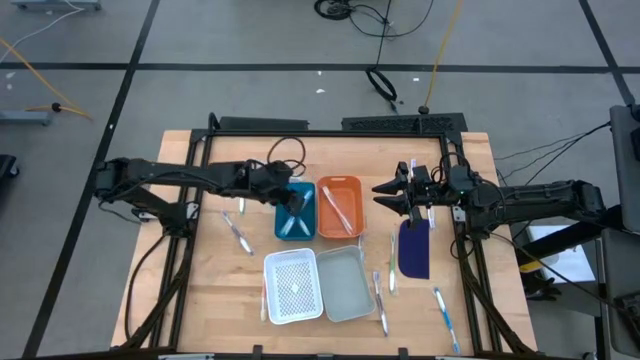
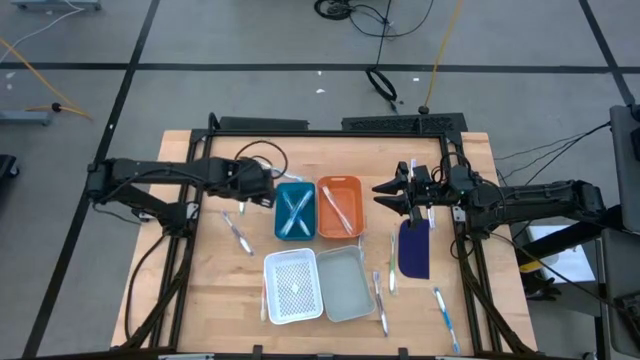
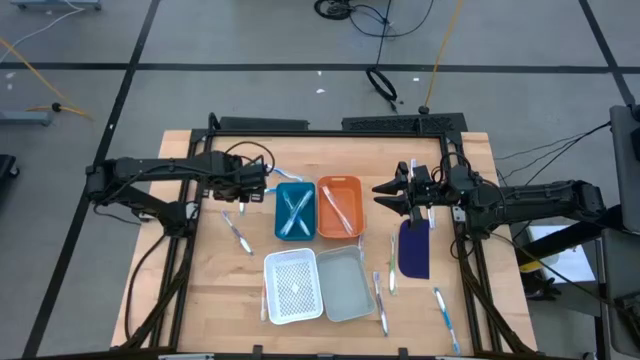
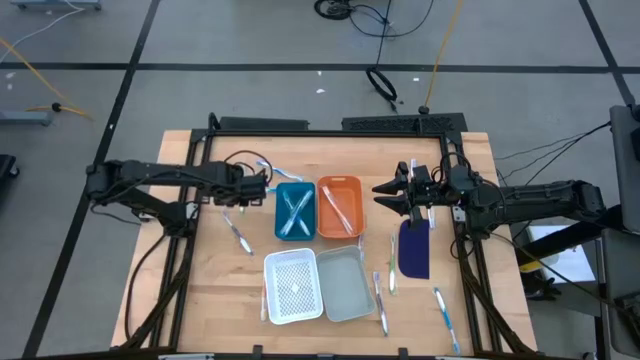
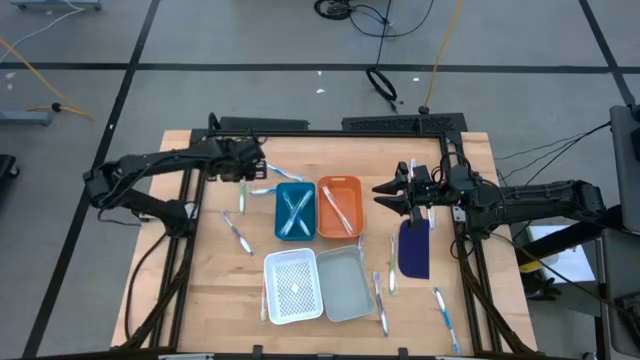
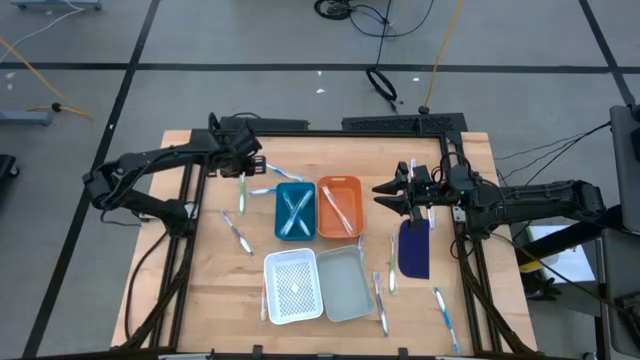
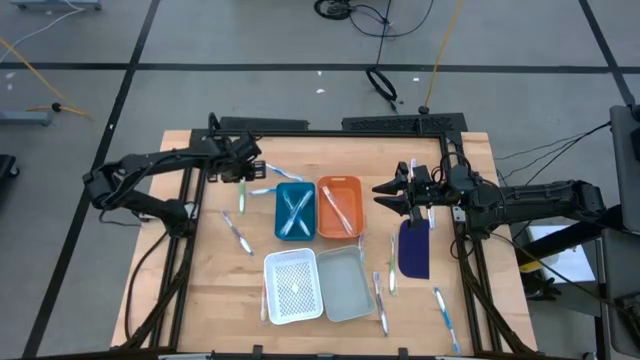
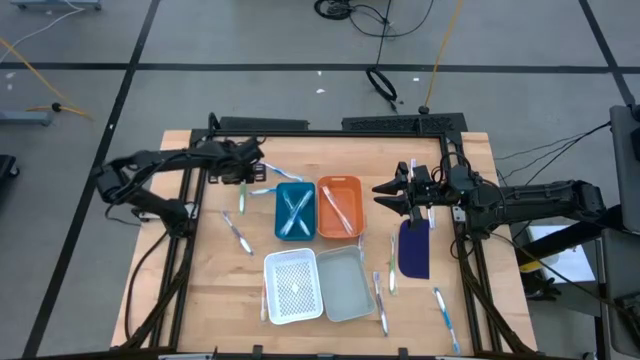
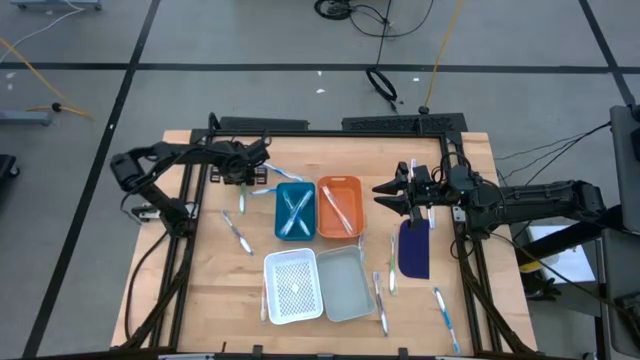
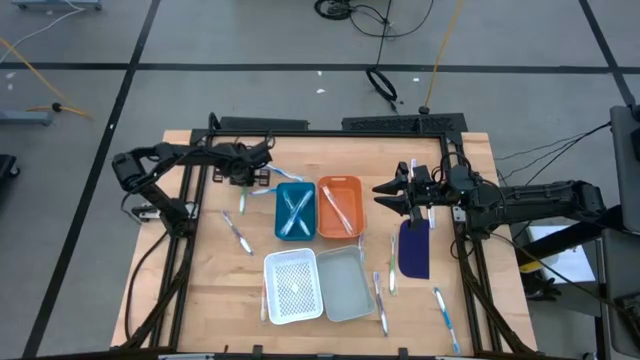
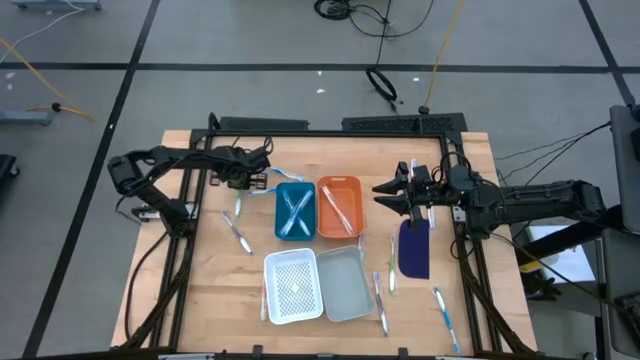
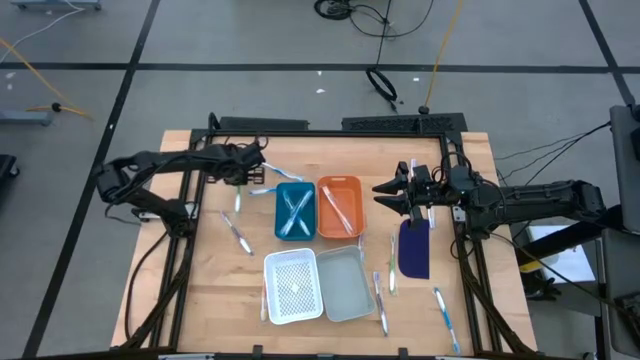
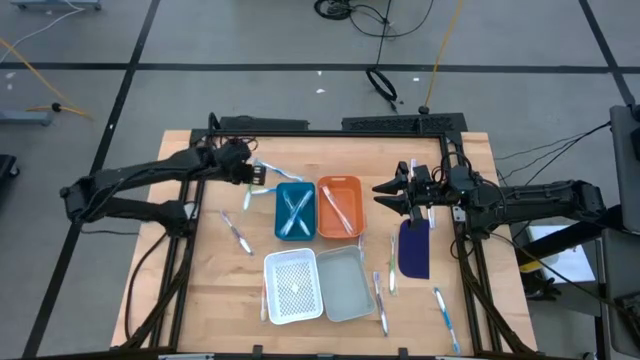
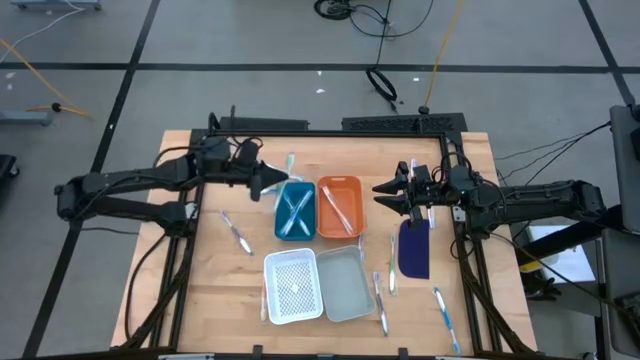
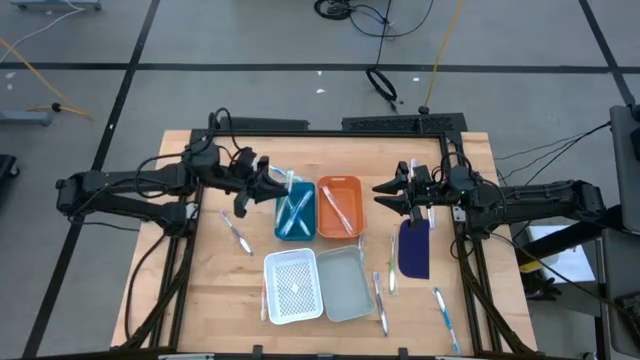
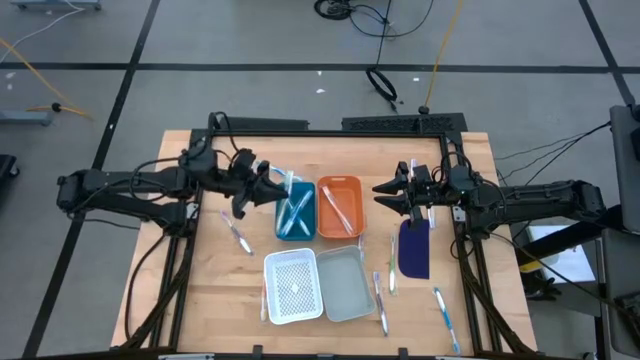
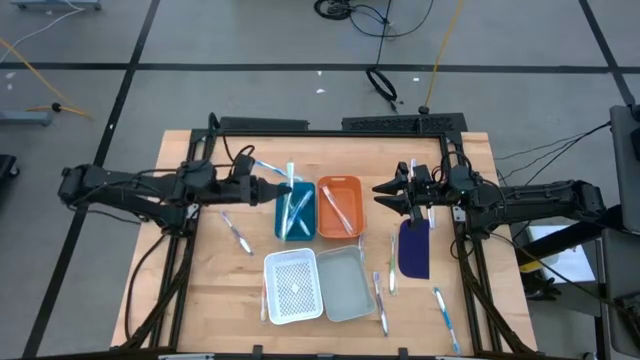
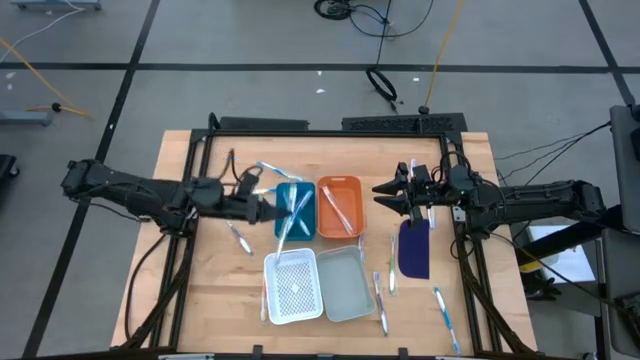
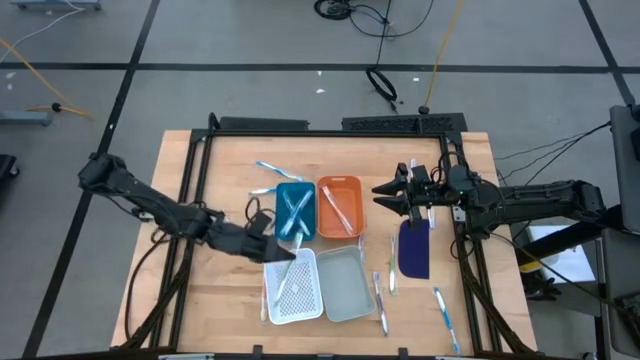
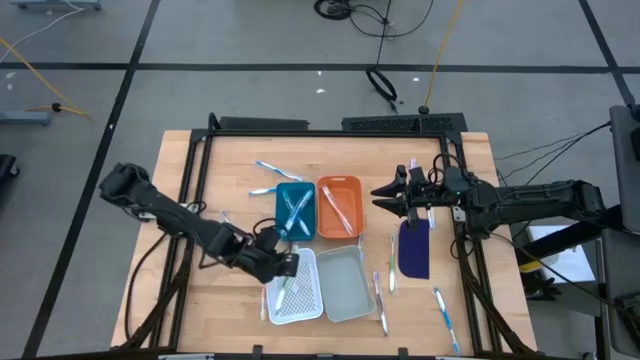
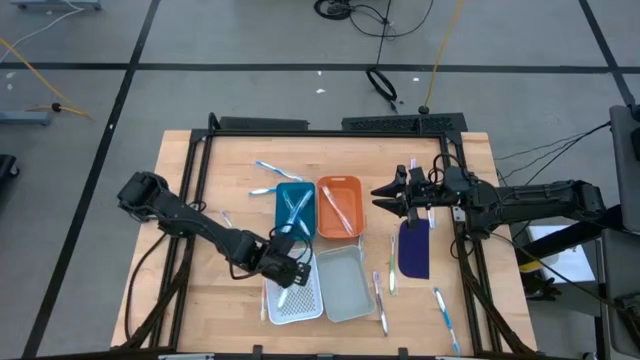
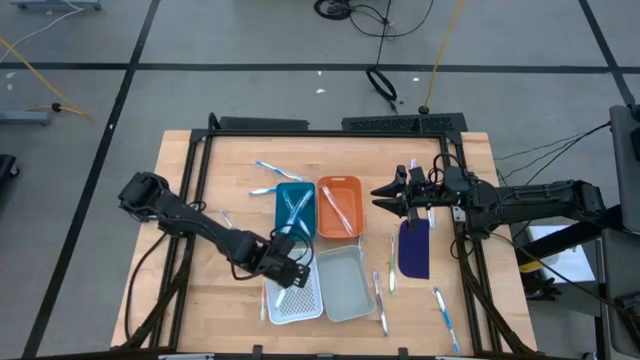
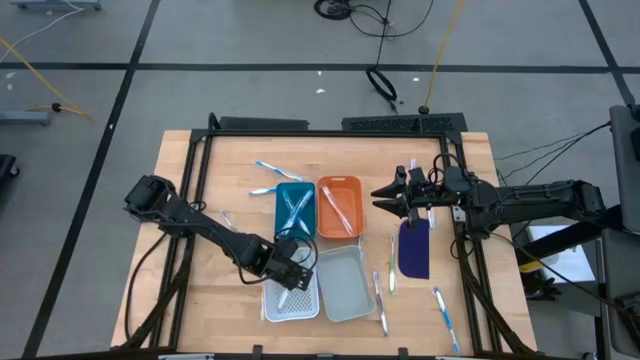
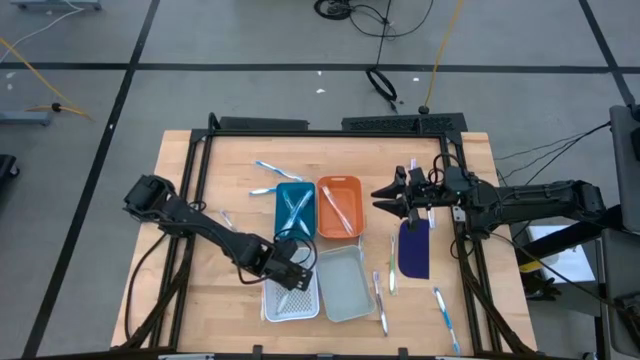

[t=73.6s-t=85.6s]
Task: Pick & Place Toothbrushes
Put the green toothbrush into the white bin

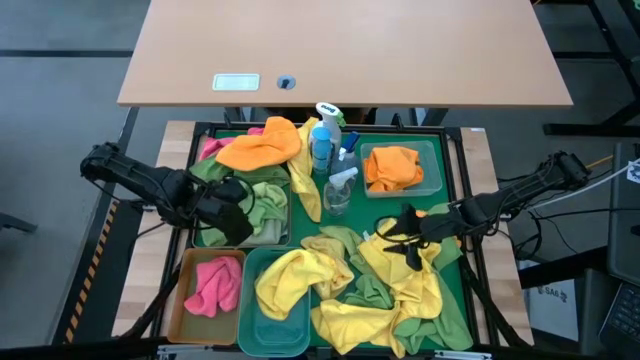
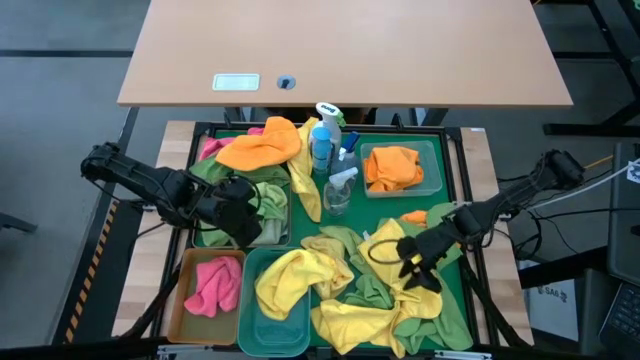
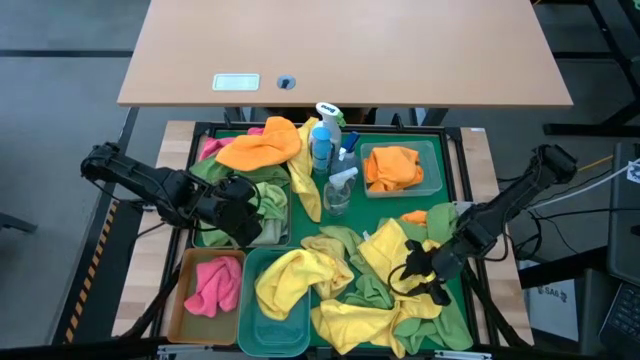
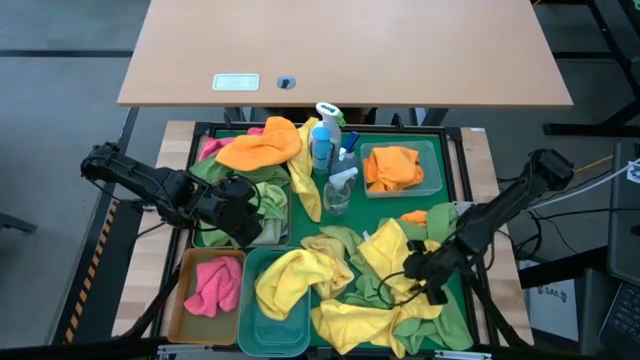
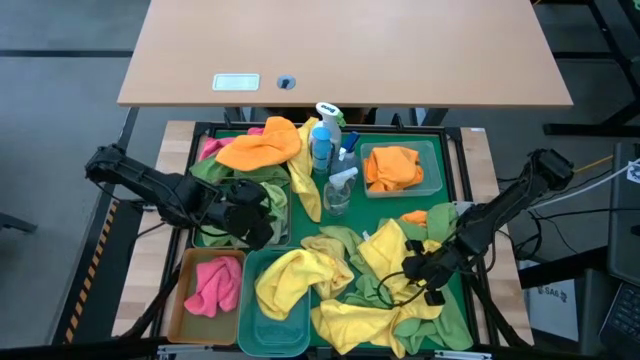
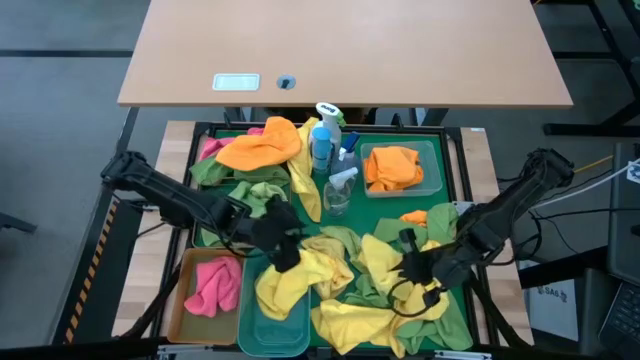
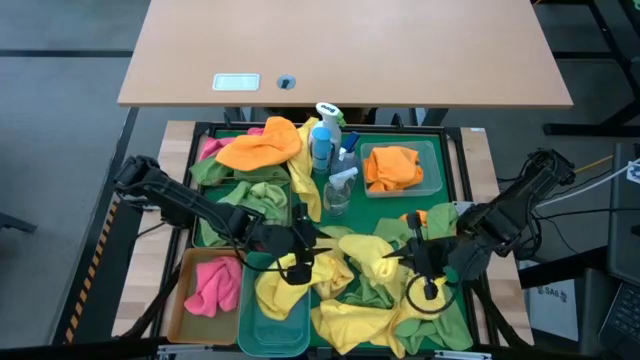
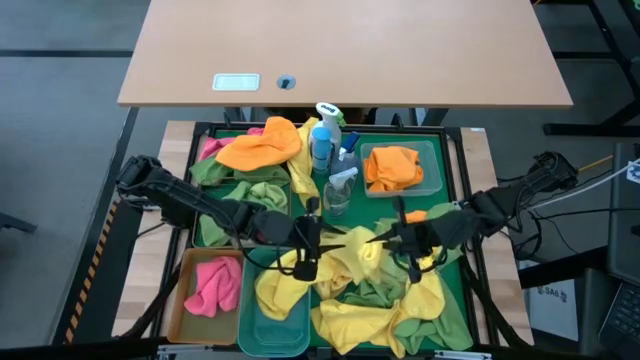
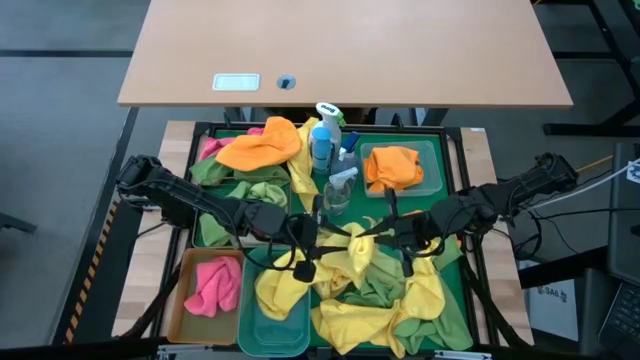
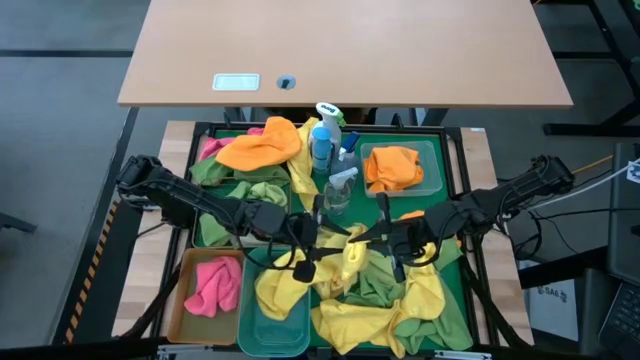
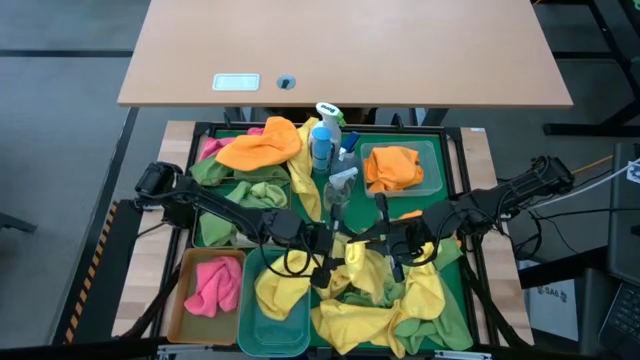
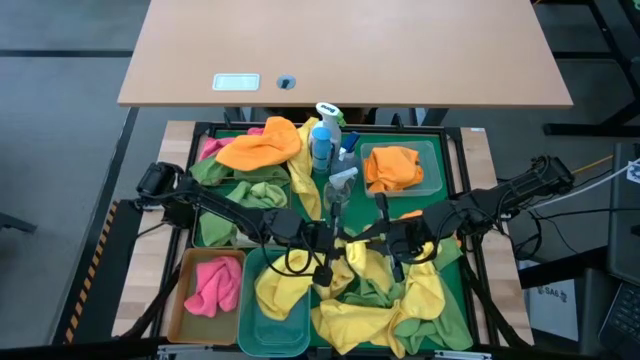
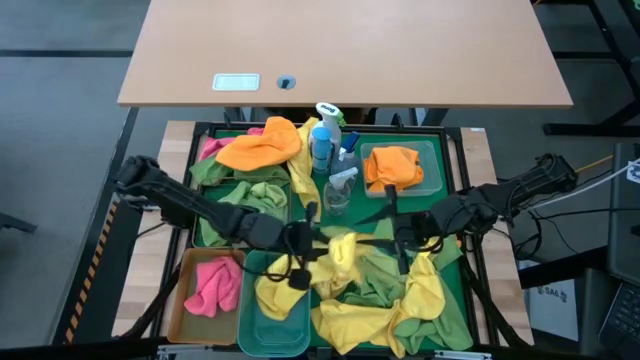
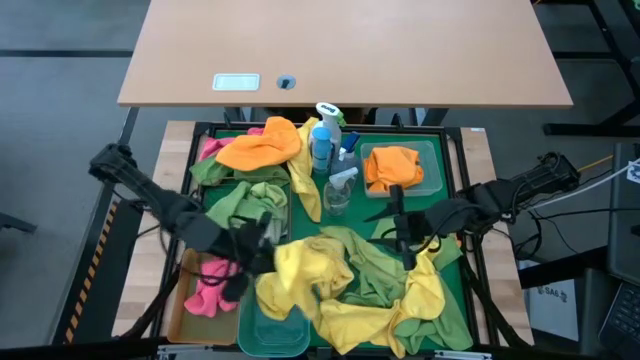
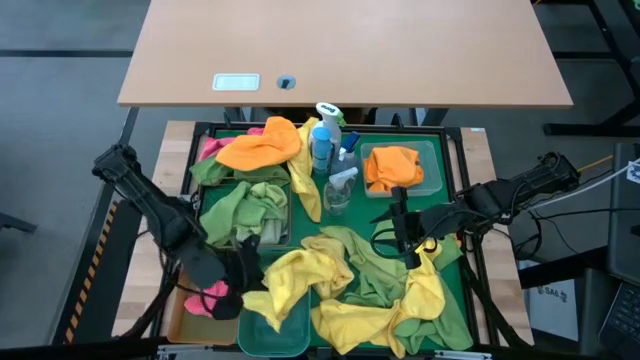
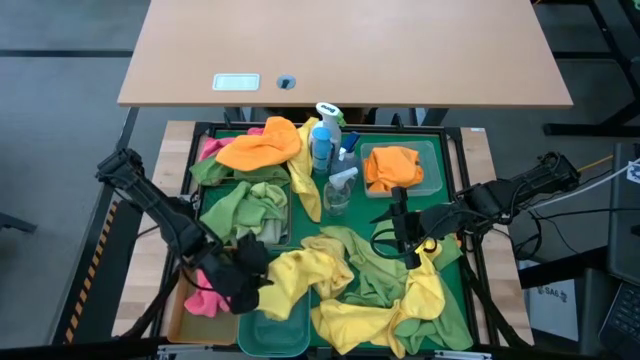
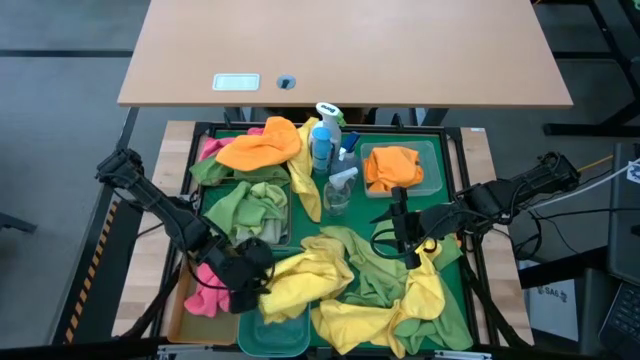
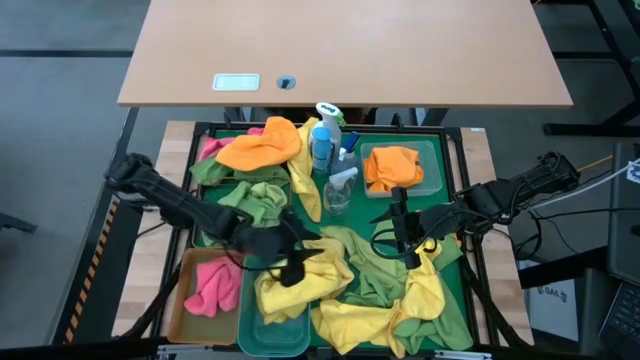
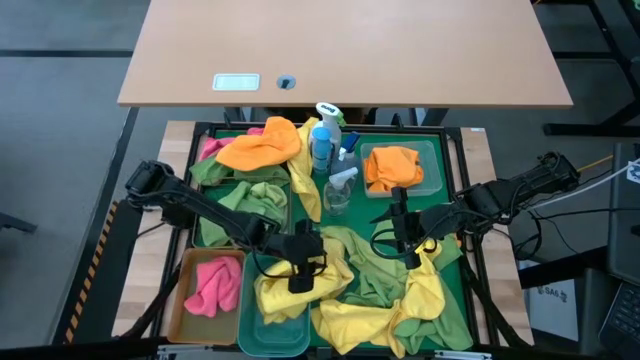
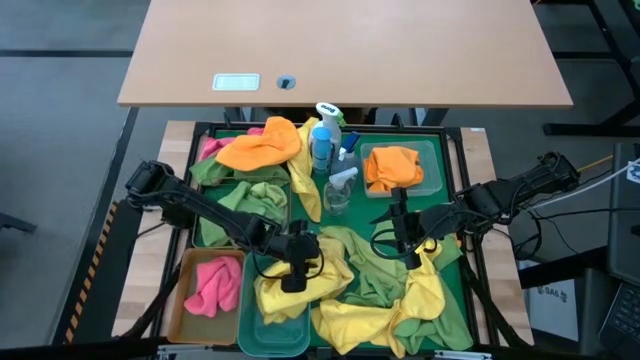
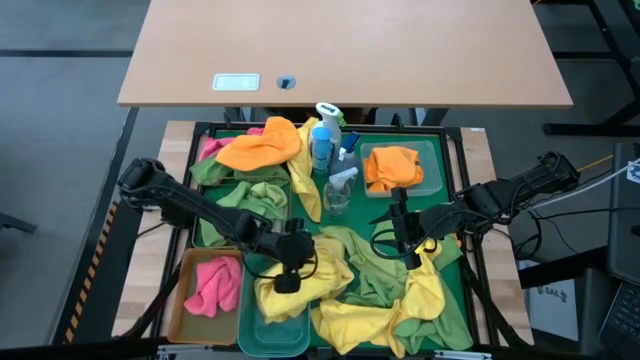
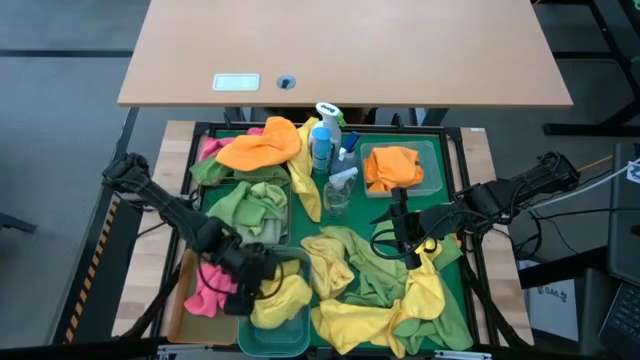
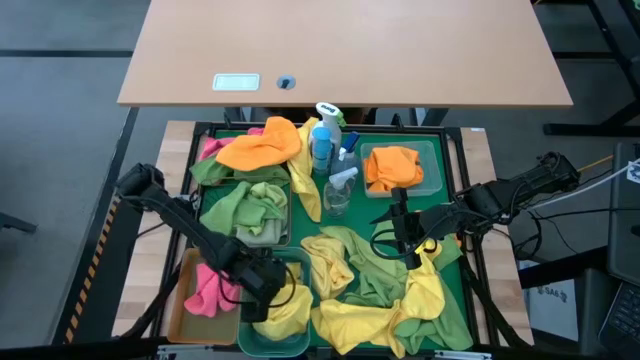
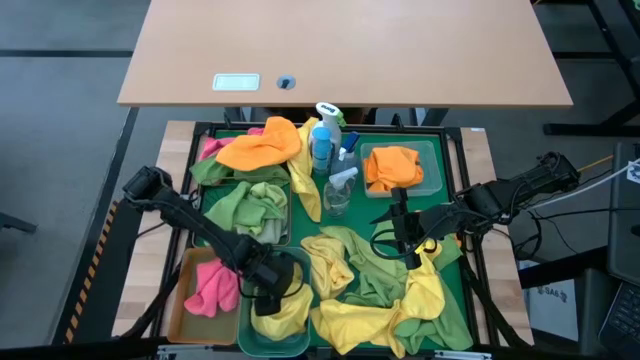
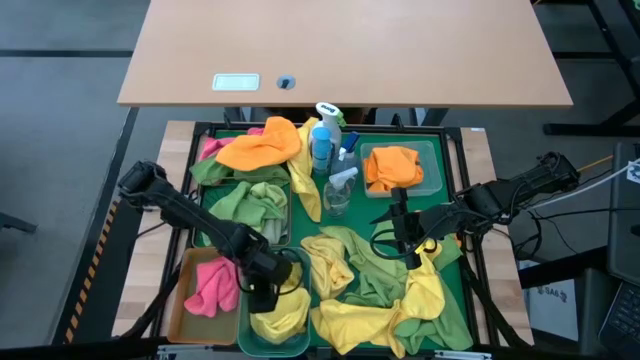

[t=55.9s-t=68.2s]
Task: Sort microfiber towel by color & place in baskets
Put the yellow towel into the blue bin
